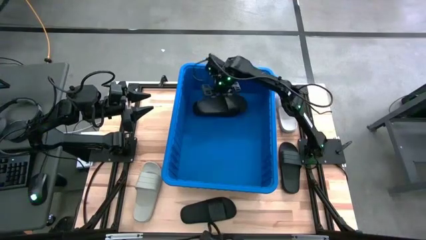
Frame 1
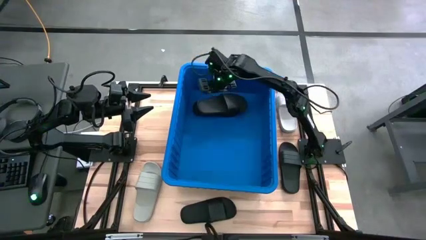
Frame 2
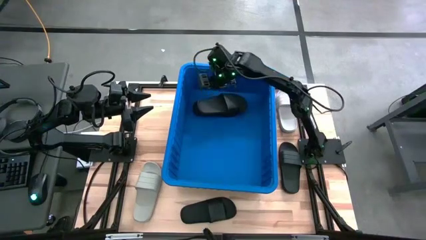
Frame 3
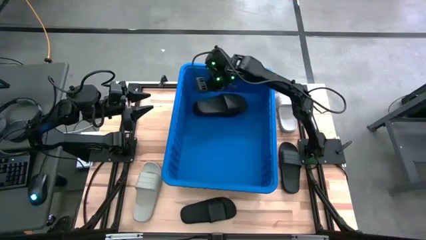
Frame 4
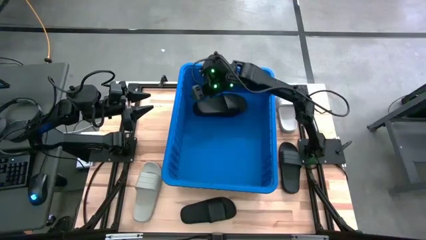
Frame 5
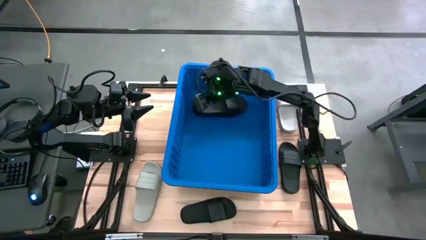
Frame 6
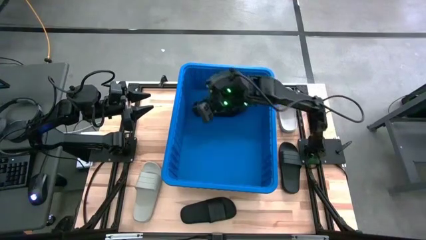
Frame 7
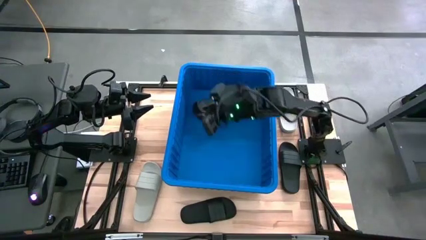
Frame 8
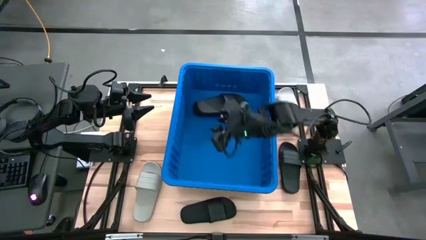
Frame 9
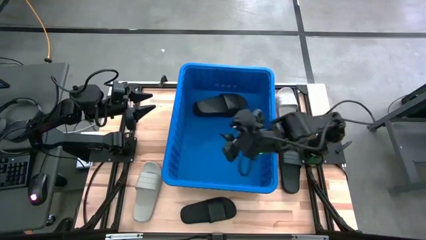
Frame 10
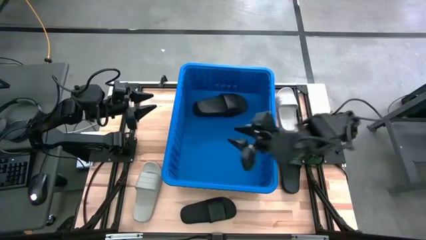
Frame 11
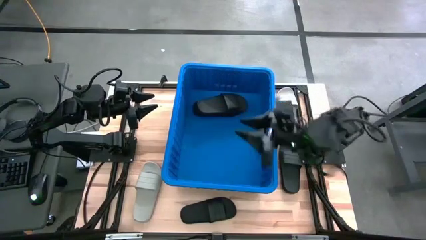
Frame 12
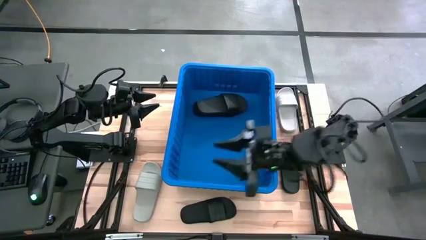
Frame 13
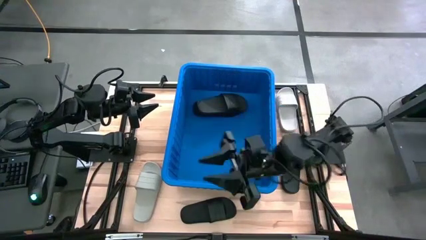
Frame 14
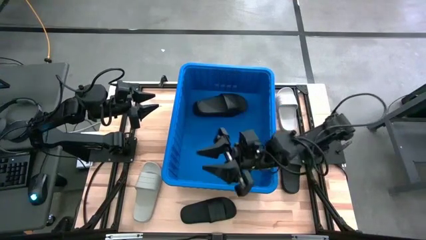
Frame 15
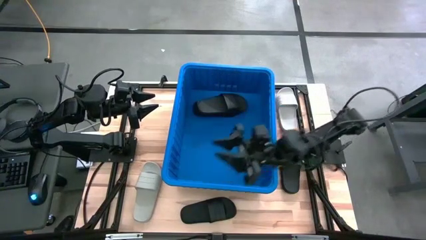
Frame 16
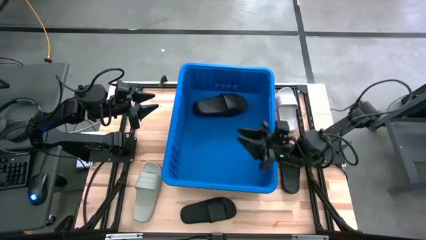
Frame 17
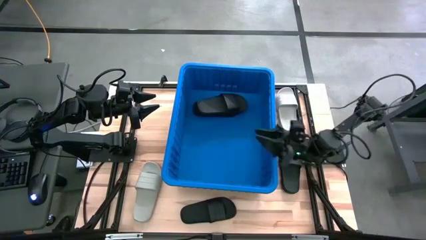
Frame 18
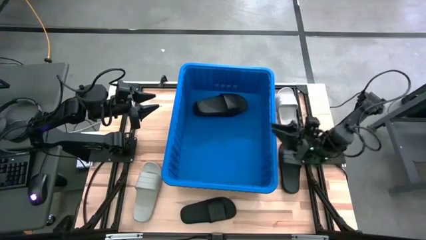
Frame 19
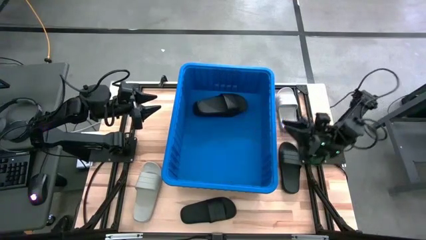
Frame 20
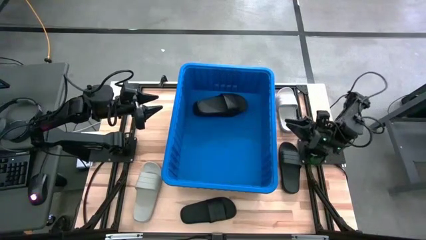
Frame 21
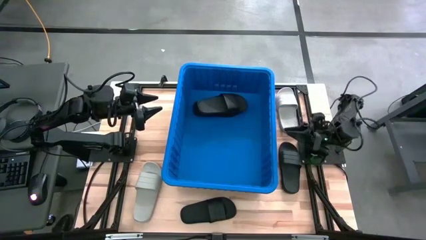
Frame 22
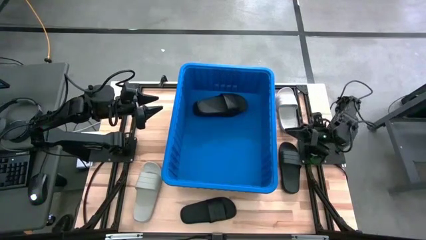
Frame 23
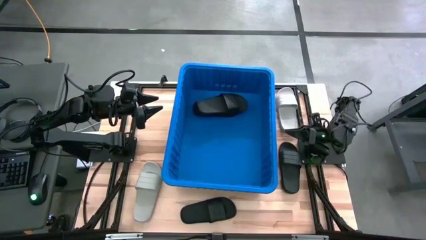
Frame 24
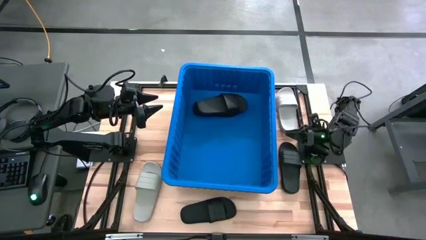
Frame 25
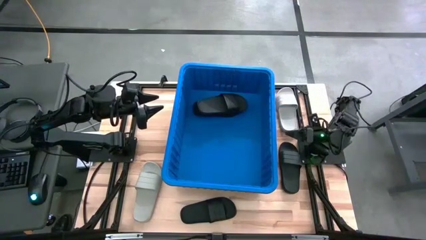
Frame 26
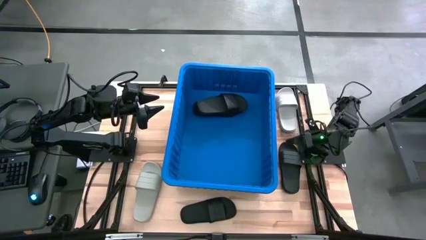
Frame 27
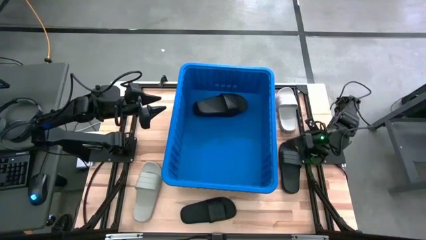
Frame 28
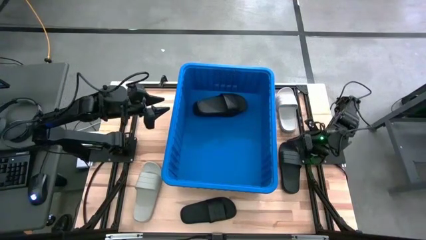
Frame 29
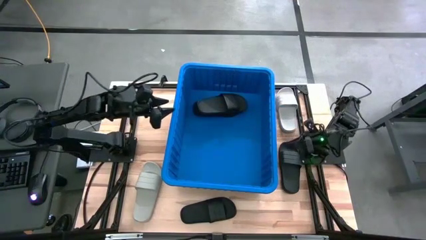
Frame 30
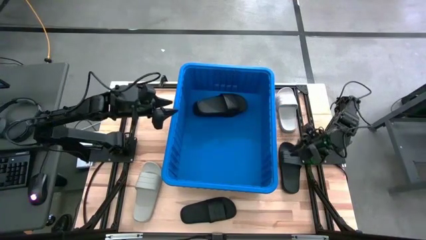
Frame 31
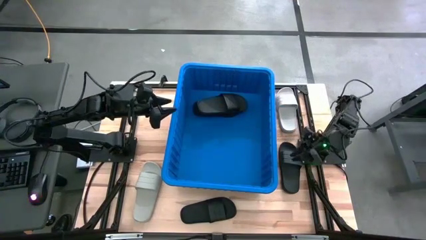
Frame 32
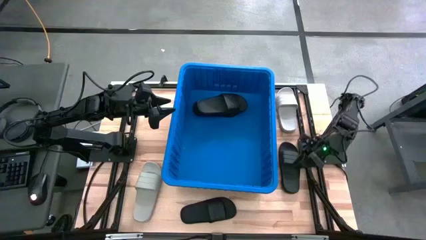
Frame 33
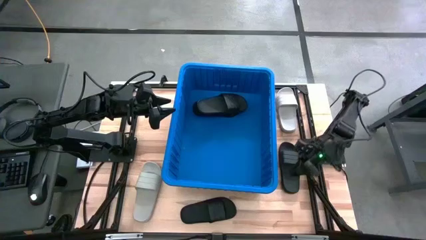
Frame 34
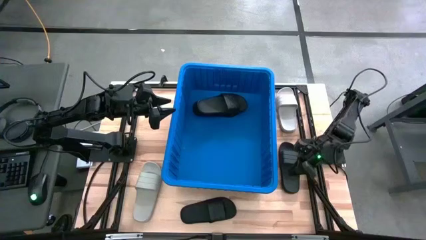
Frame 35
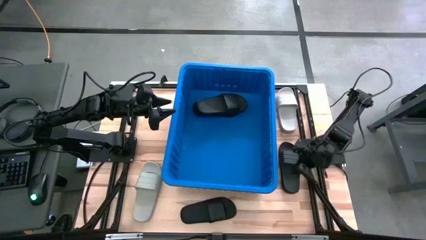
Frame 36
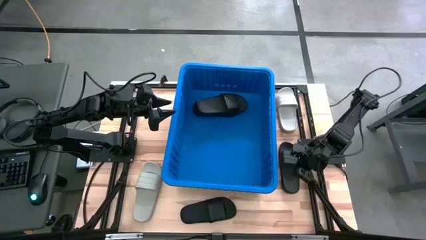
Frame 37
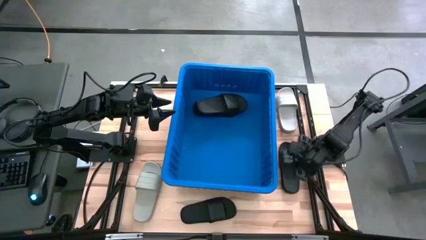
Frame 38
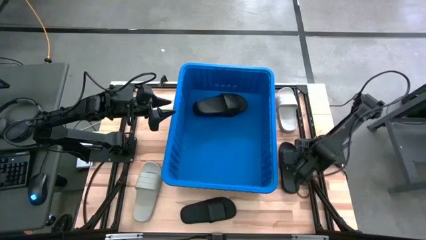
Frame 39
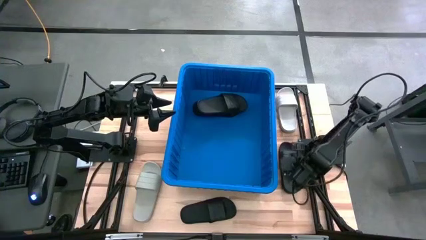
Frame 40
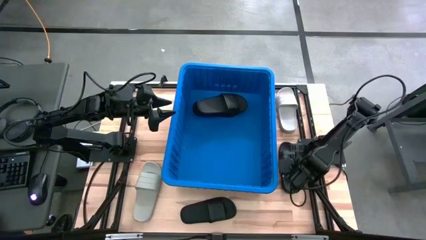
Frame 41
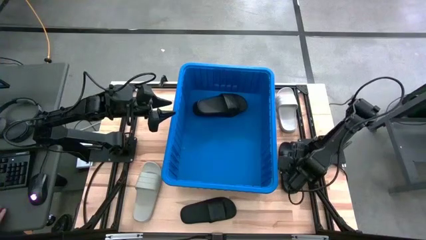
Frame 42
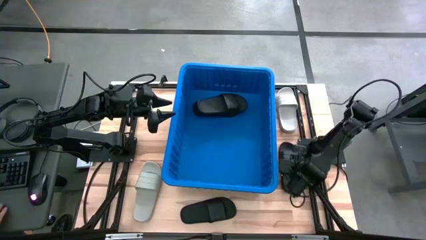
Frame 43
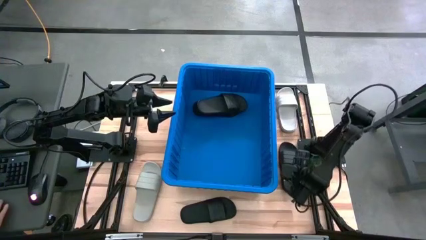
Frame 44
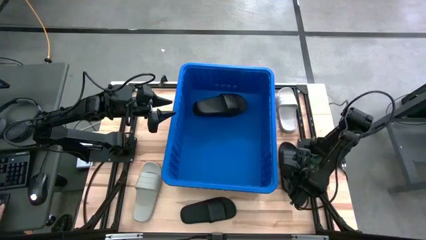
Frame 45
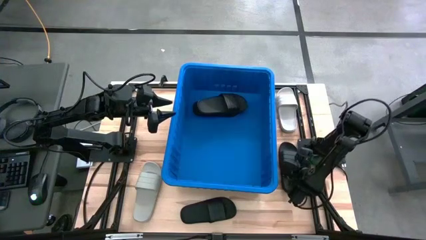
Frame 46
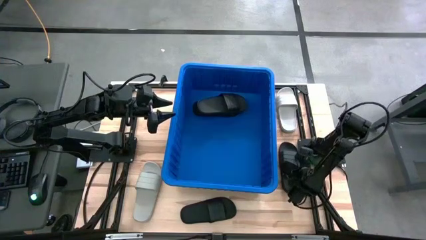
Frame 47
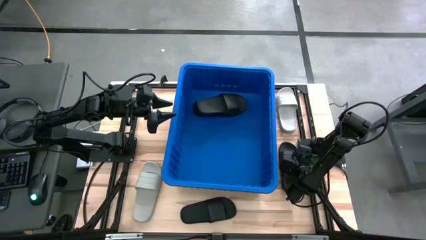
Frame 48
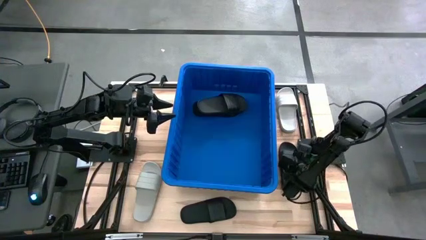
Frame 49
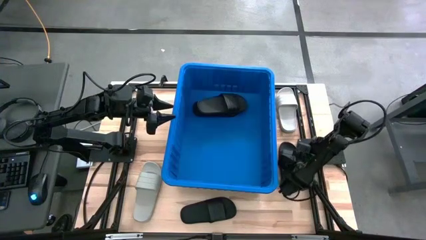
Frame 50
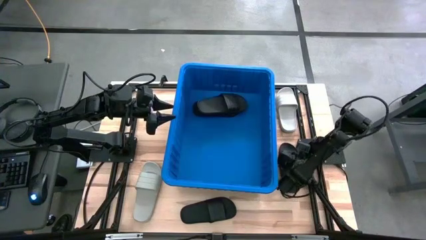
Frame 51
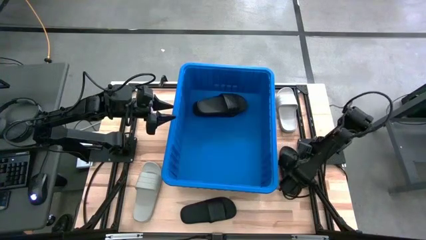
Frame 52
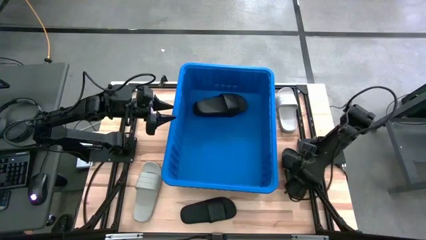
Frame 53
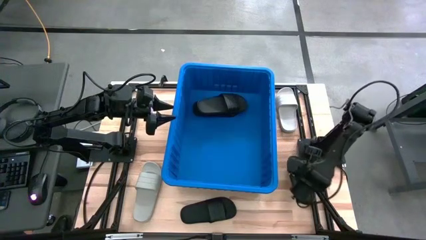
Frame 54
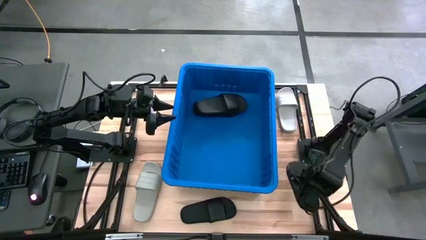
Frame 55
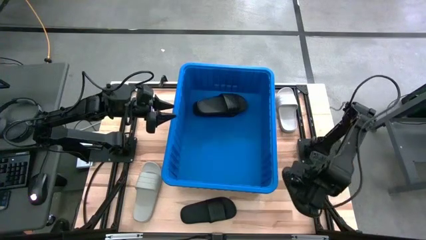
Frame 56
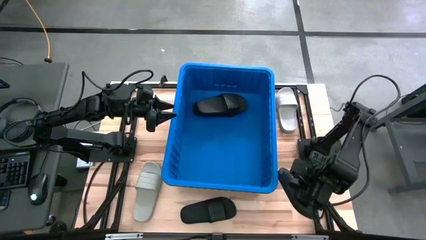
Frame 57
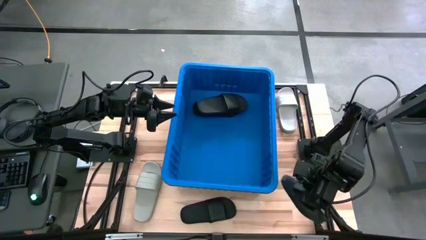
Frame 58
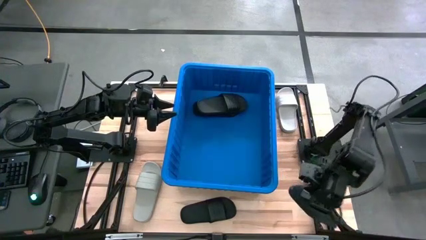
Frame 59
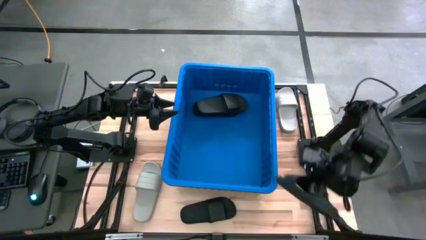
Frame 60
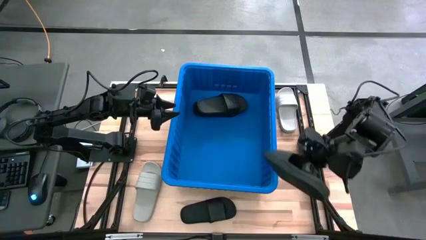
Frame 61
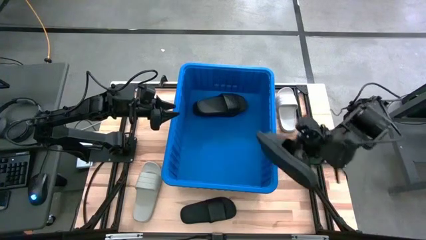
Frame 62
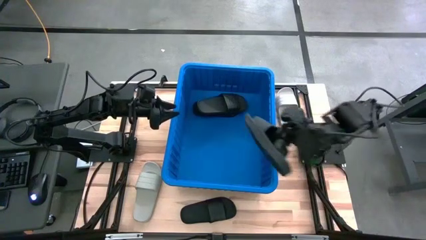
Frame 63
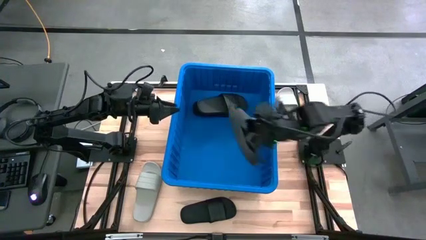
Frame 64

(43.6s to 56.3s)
Task: Pick and place slides into bin
Put the black slide into the blue container

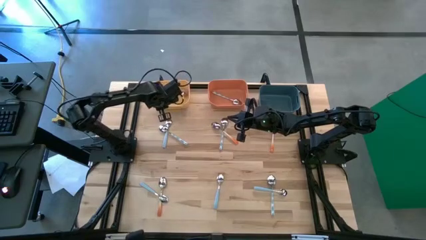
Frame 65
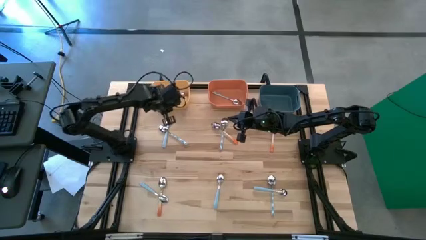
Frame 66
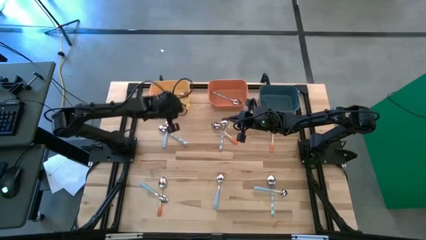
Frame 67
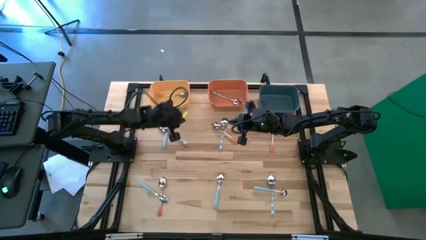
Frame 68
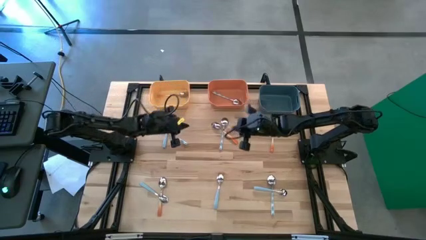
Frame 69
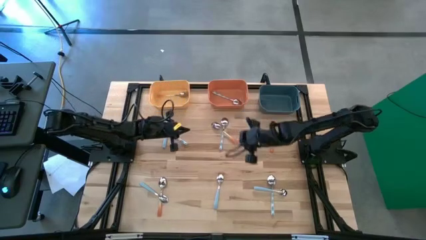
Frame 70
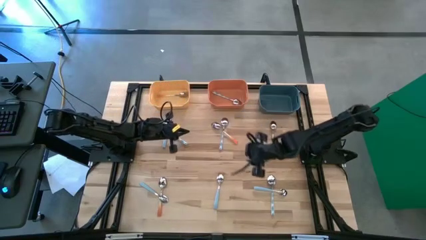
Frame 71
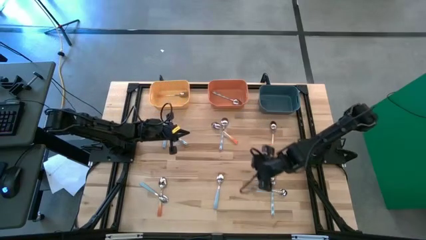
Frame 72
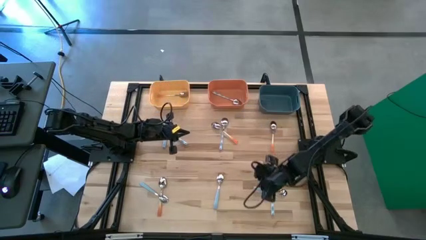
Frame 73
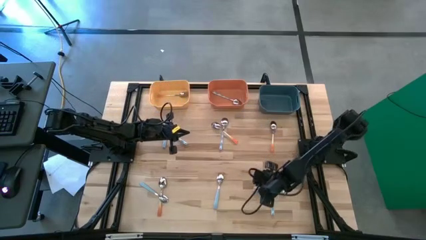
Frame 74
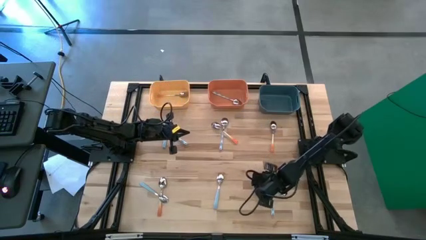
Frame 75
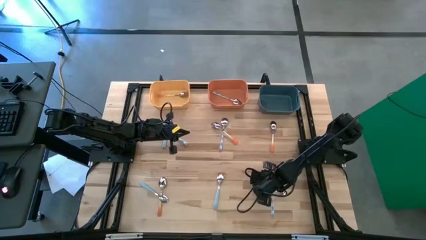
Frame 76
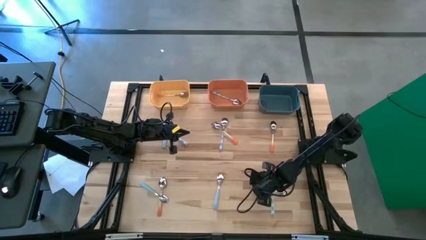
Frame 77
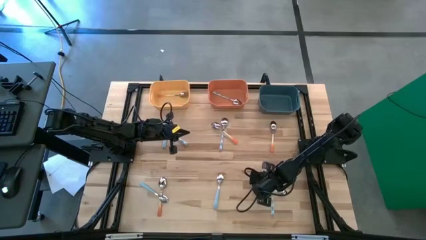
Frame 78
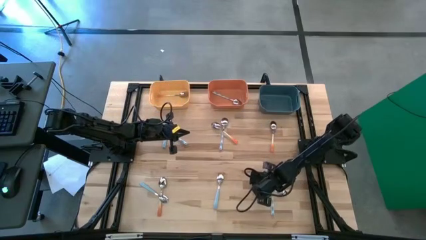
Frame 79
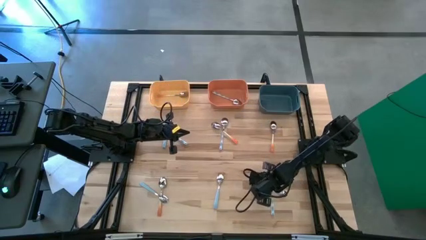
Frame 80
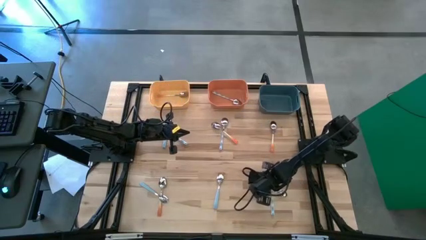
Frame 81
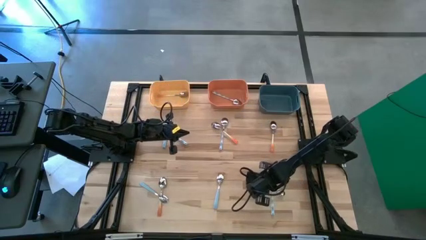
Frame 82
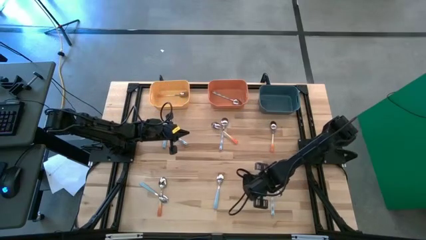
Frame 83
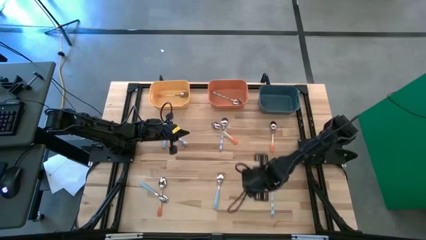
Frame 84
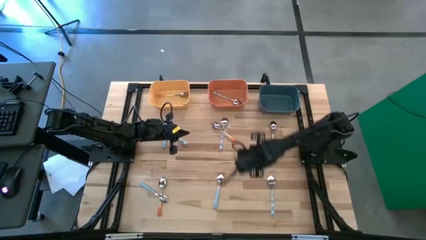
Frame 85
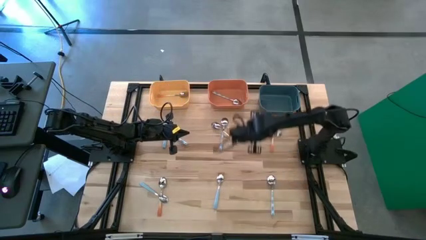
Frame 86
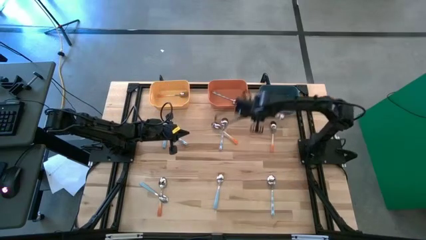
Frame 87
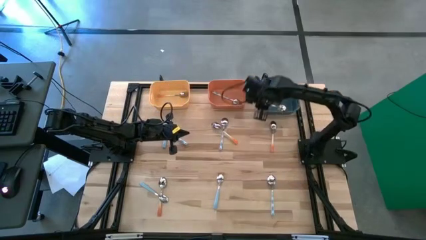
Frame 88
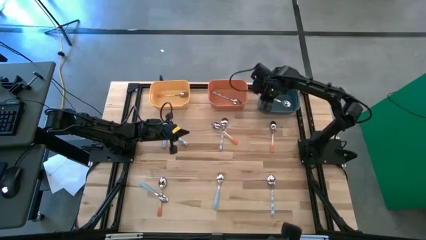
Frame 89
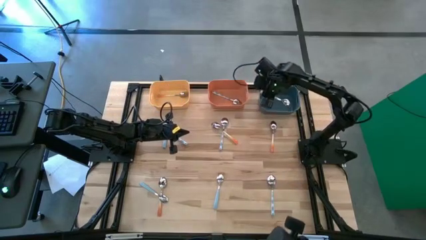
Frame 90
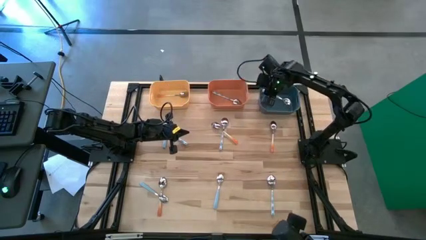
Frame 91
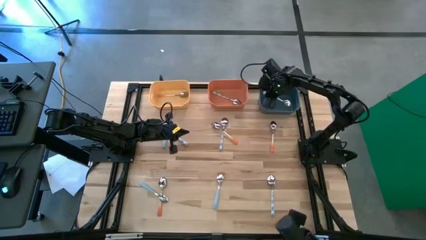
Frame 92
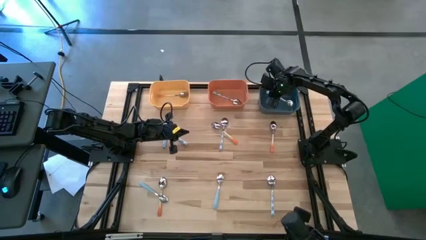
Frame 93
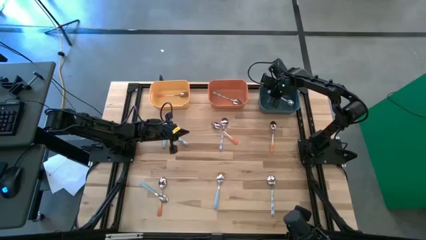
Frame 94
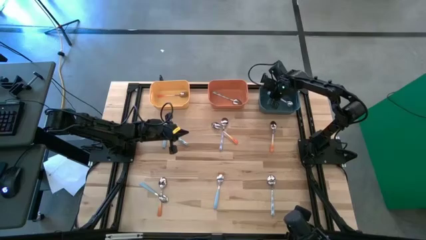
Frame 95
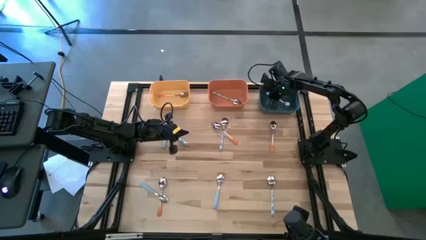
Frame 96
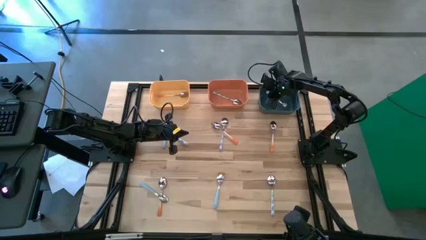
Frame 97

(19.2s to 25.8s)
Task: Sort silverware by color (type)
Put the blue spoon into the blue bin
